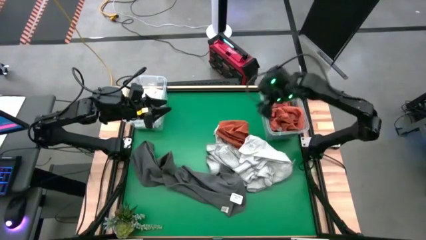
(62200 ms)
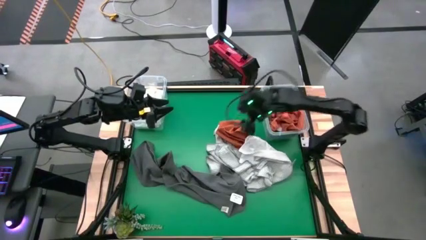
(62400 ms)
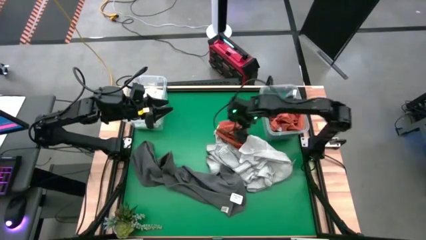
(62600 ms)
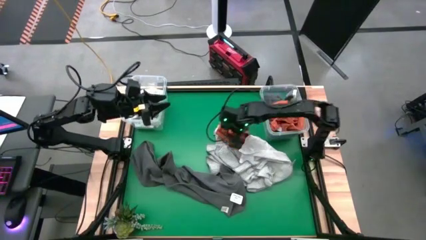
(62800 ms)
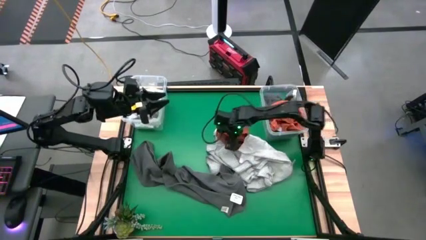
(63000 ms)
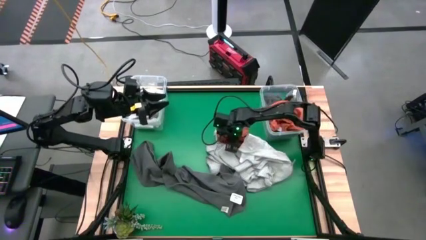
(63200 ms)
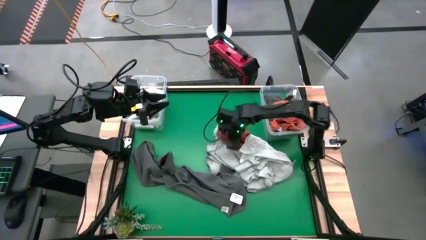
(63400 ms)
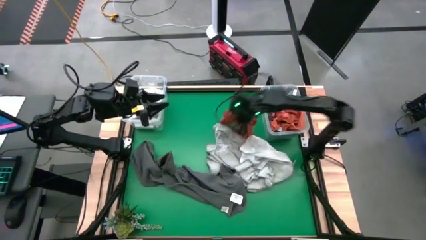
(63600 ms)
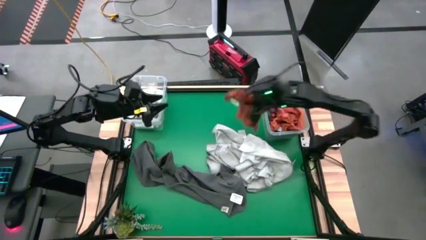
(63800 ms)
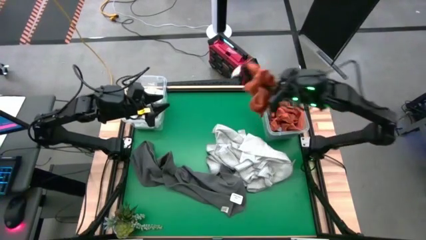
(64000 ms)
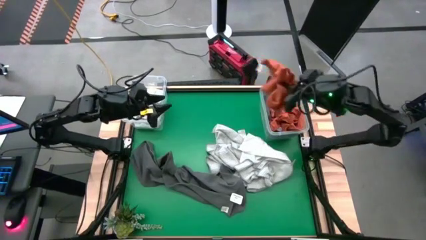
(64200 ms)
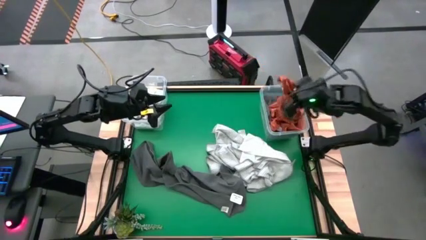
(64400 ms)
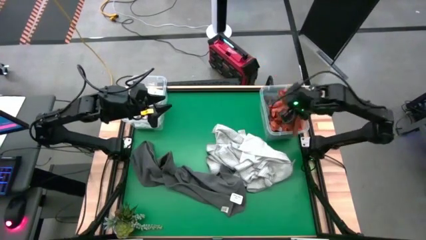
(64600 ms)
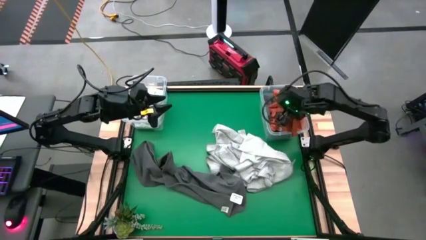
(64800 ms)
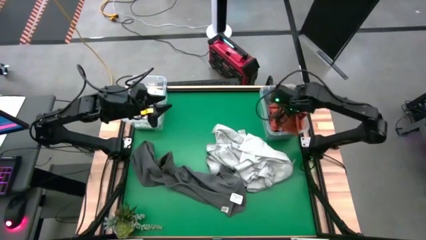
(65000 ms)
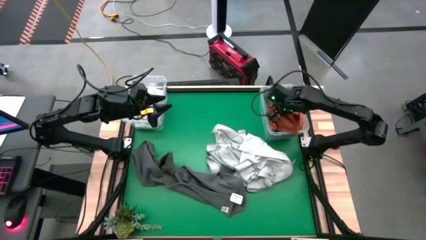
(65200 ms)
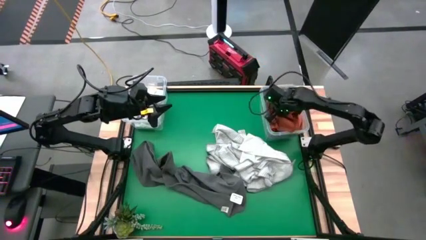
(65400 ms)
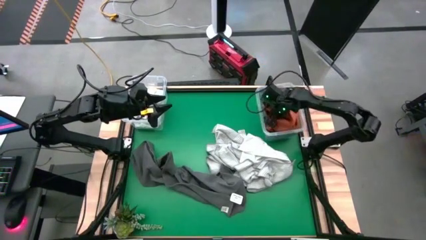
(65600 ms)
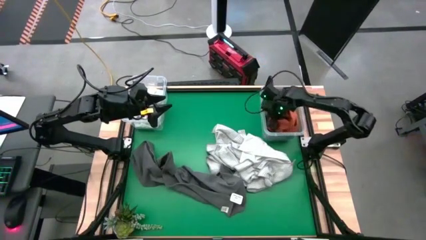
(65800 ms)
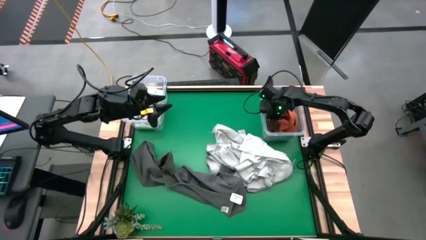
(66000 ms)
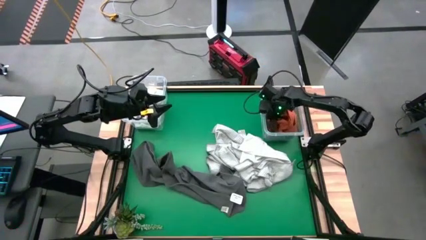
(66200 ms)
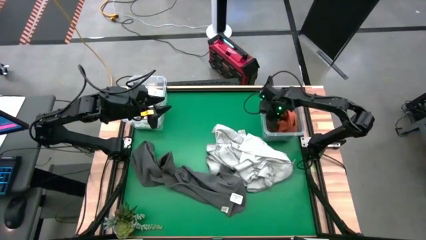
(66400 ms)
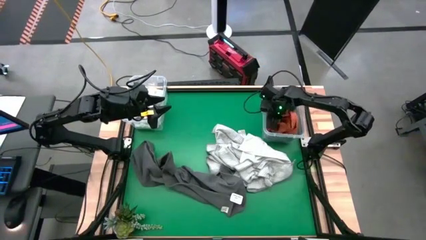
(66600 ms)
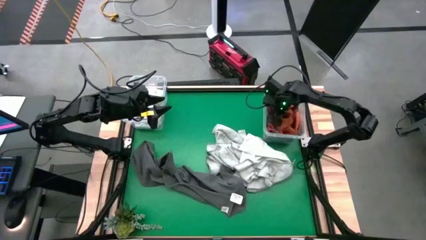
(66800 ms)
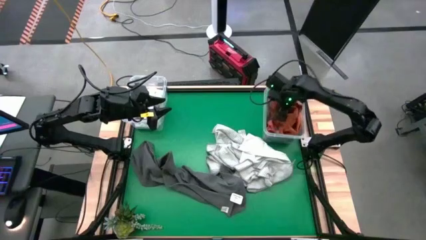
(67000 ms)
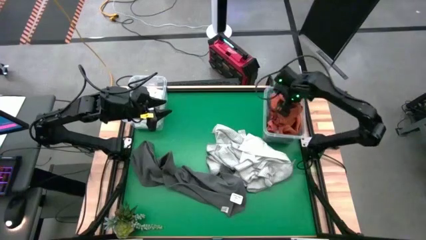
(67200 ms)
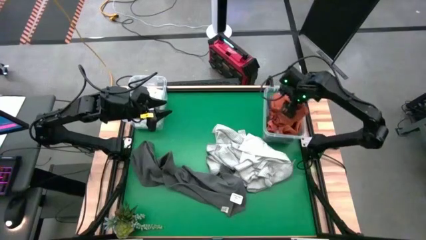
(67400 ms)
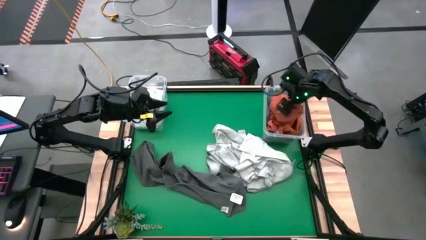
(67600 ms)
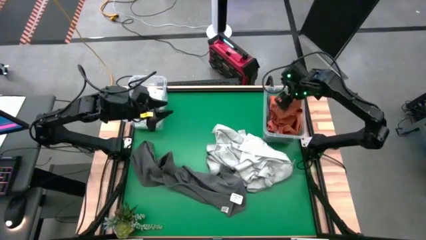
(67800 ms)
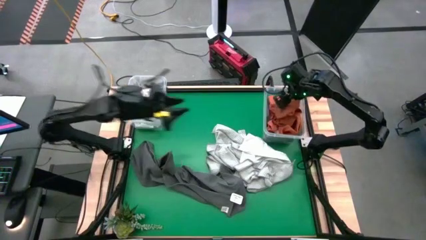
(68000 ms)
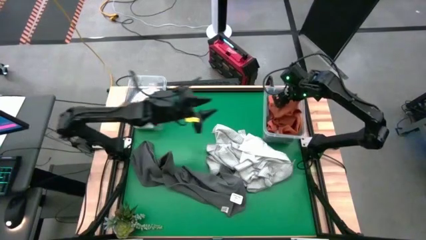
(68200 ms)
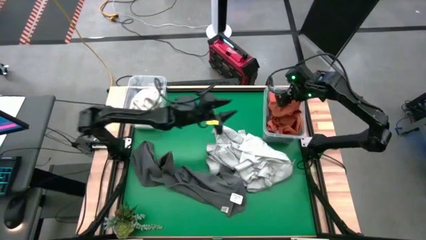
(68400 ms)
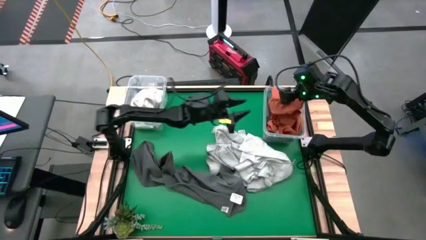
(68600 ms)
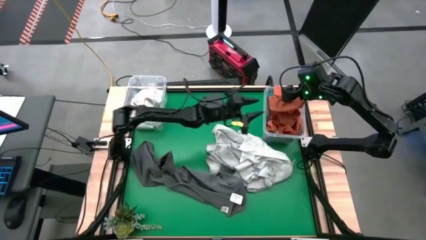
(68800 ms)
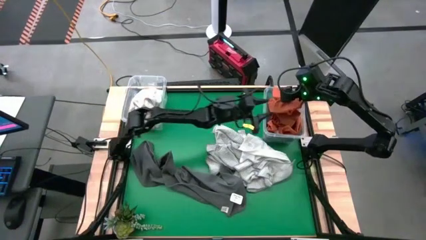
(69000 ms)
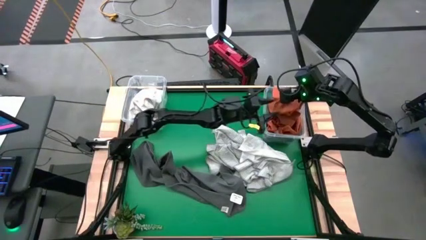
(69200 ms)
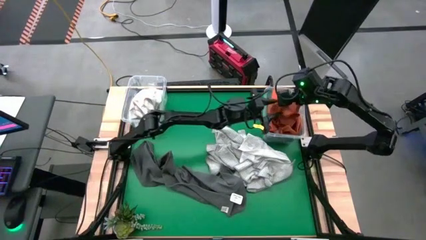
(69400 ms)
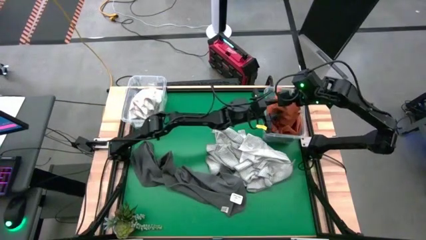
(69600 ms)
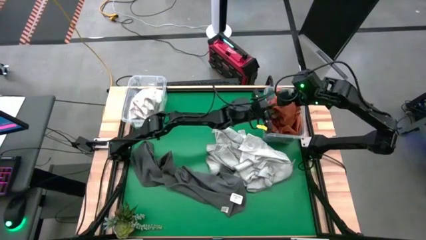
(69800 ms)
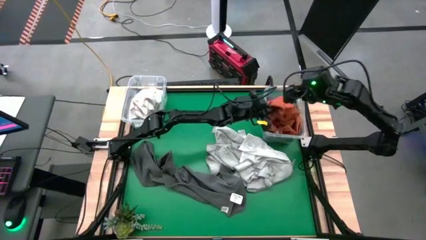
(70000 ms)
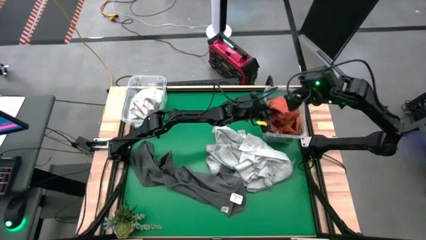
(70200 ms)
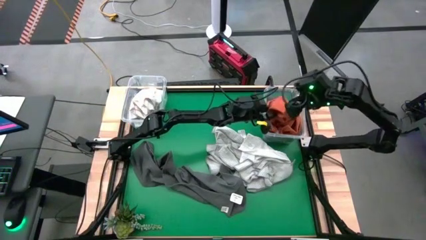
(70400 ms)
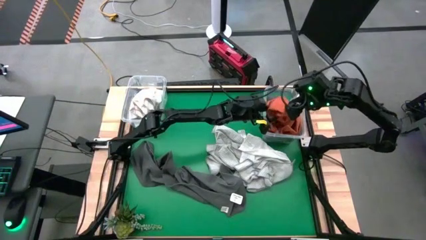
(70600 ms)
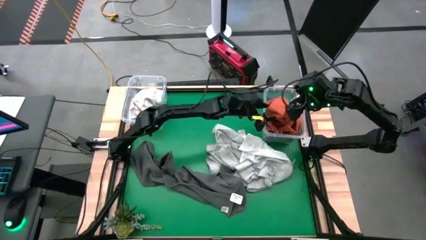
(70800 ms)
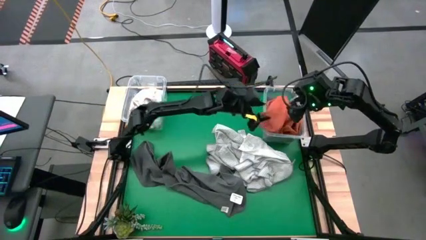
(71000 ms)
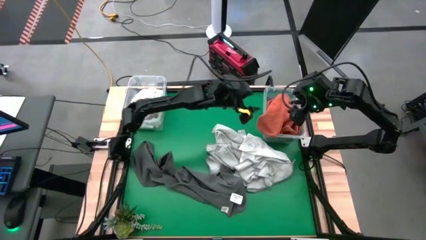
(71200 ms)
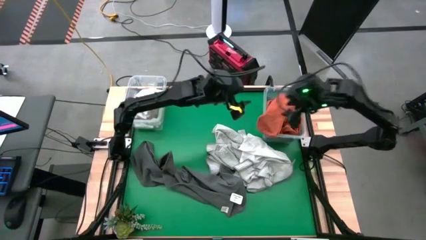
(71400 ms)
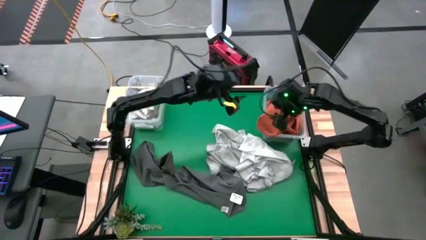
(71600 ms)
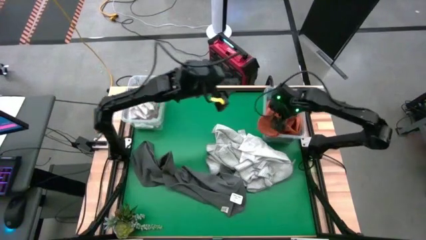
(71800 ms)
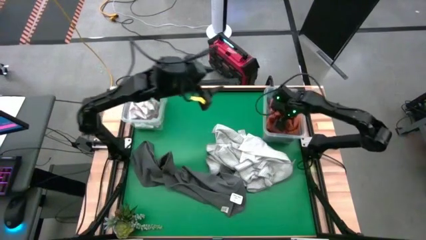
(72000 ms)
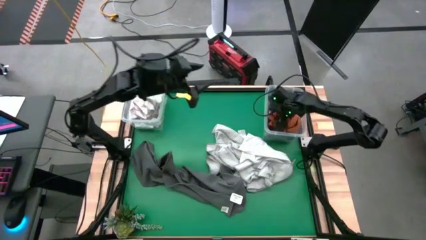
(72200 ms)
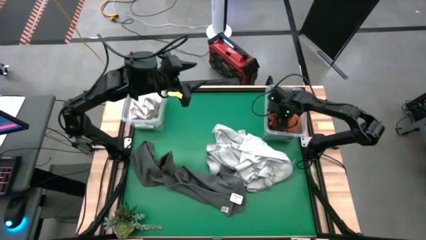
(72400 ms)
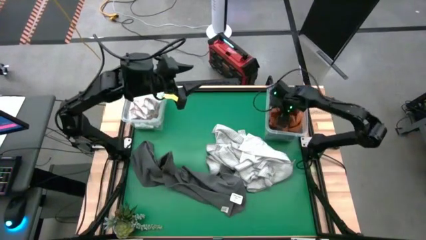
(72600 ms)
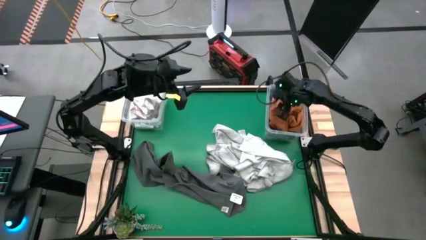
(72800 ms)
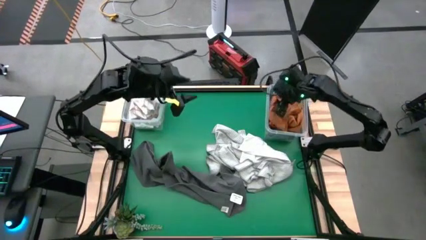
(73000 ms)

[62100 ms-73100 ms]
Task: Sort towels by color in basket
Put the orange towel into the right transparent bin

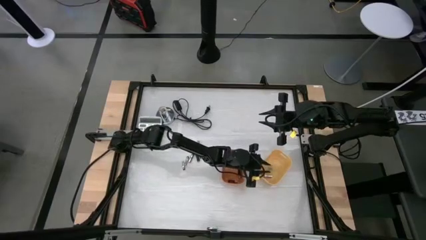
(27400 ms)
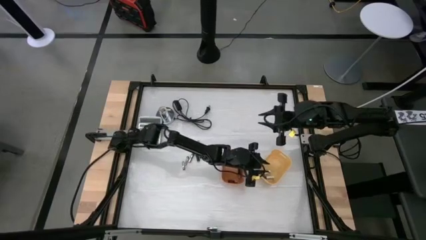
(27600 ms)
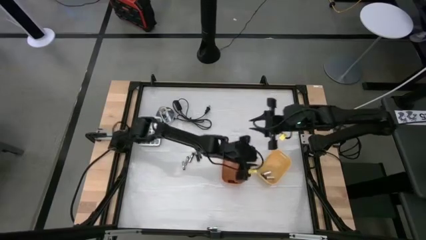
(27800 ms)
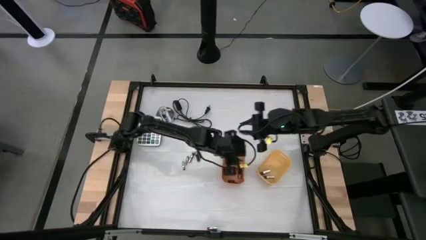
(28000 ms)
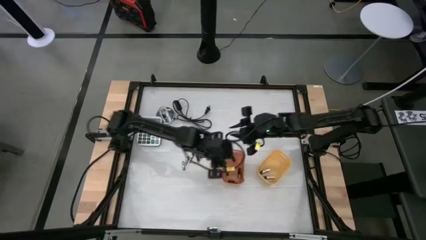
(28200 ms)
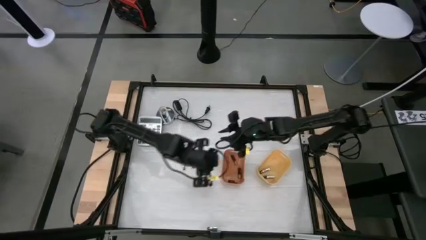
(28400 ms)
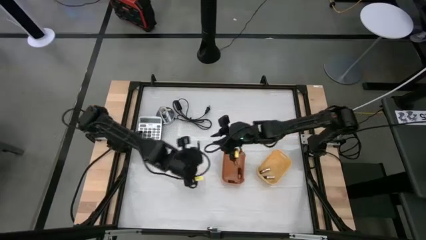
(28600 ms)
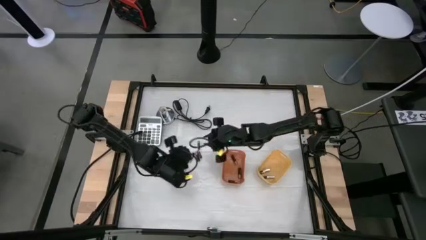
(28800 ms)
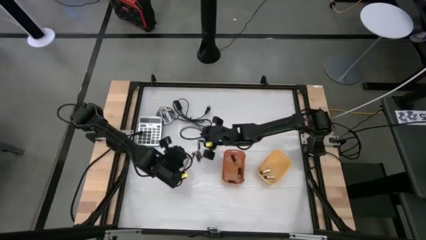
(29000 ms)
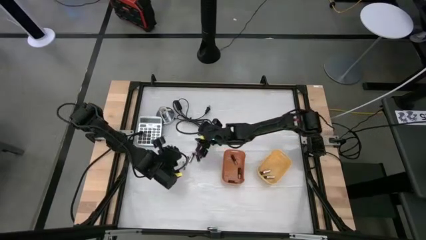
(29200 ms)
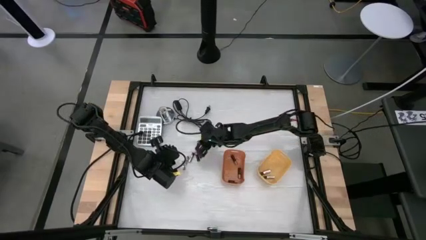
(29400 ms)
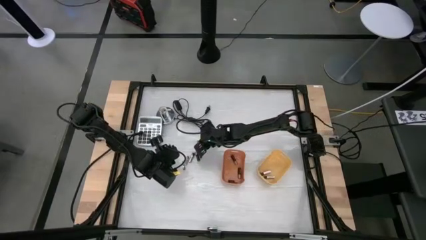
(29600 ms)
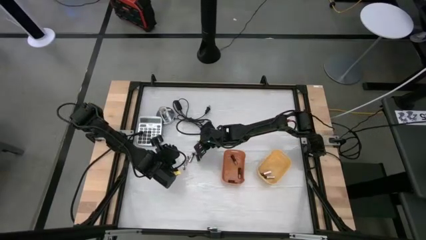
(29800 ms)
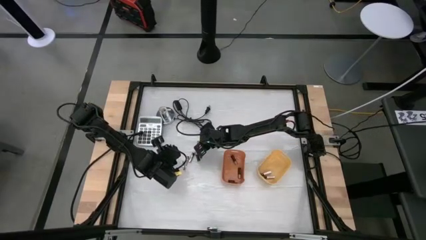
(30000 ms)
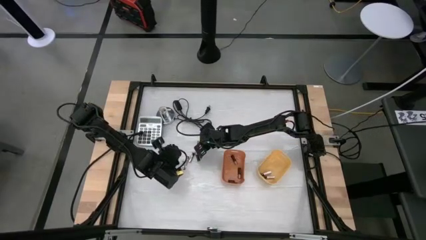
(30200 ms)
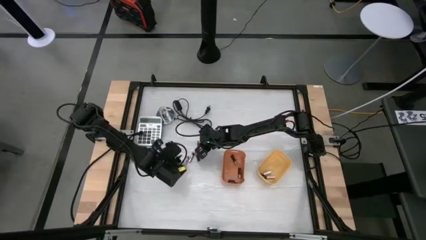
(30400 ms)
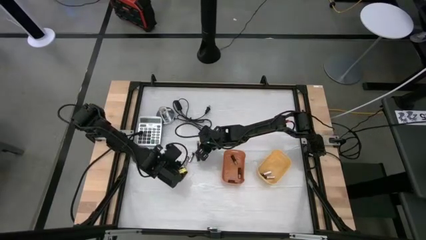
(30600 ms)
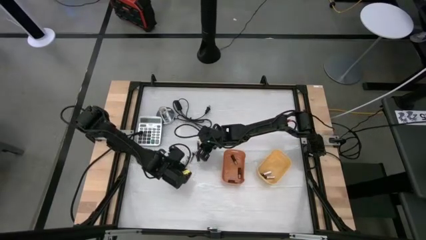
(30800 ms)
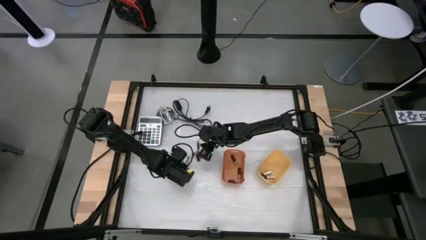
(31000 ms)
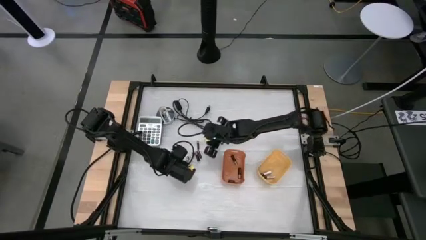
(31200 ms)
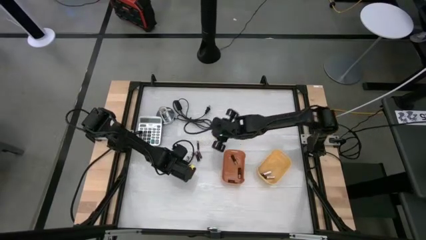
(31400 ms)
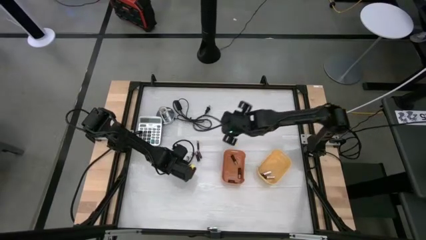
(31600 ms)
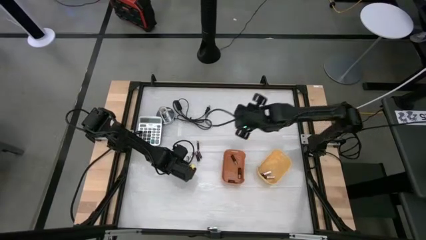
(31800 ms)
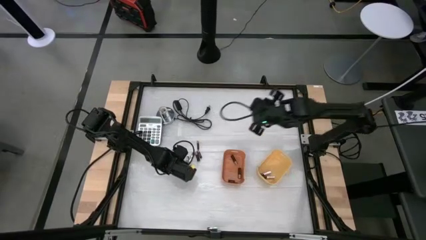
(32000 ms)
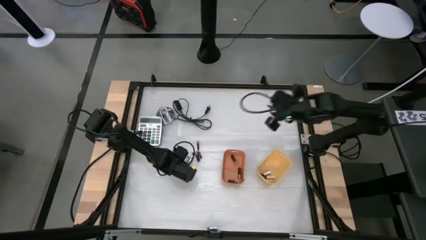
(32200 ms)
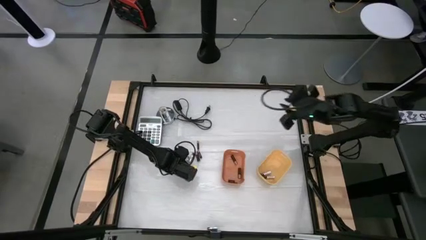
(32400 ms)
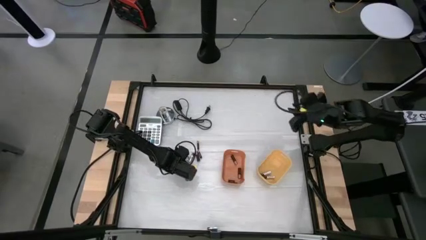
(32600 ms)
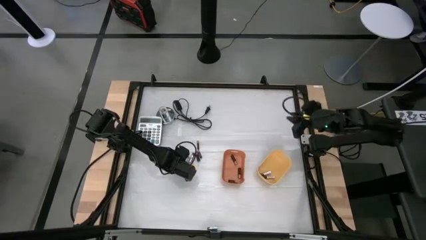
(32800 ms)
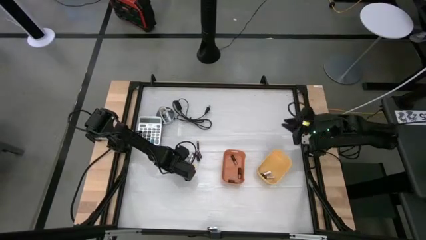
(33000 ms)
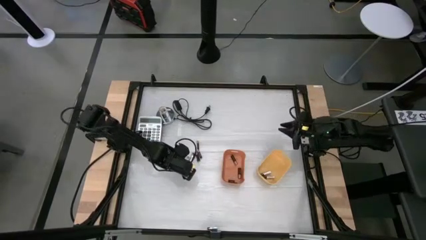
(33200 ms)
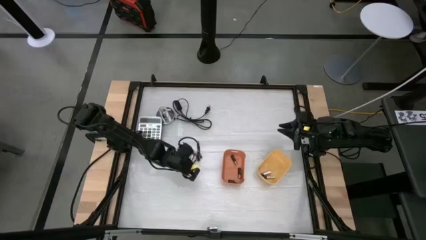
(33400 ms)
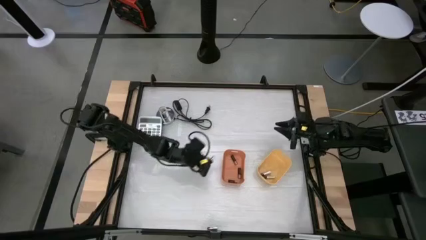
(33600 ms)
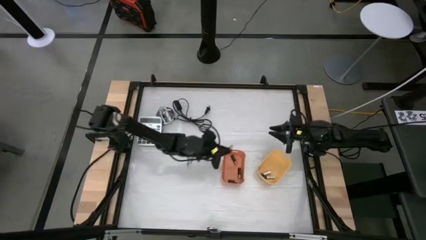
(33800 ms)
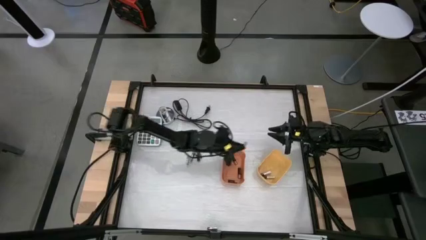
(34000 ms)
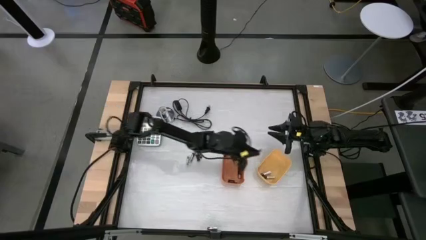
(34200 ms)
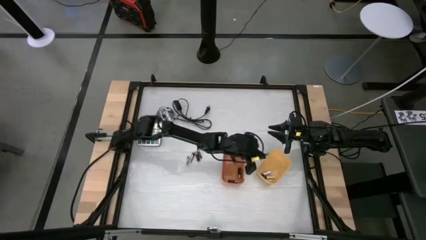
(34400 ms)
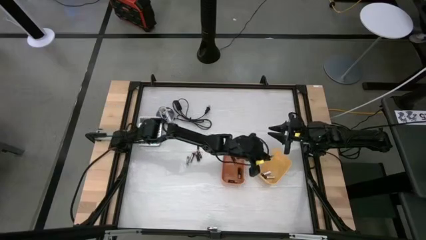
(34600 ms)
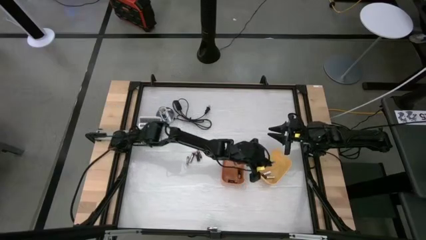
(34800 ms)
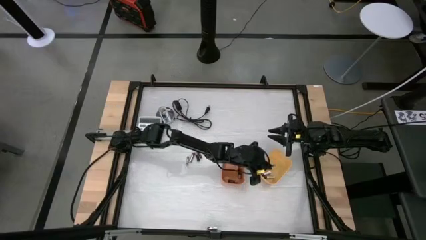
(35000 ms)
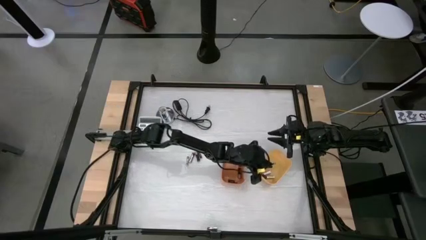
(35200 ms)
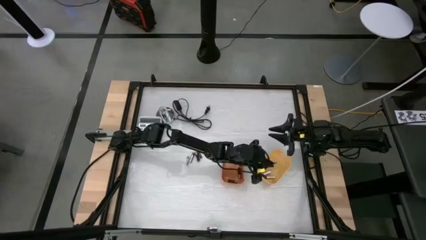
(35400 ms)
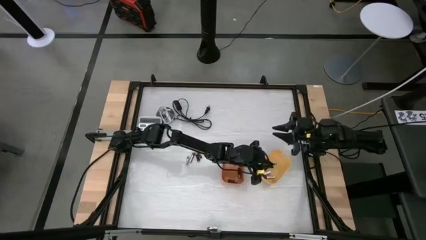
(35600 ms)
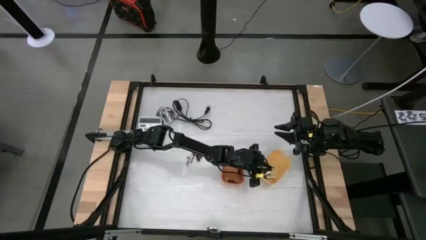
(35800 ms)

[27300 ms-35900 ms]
Task: Sort batteries
Put the silver battery into the yellow bin
